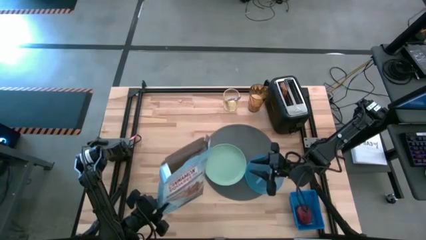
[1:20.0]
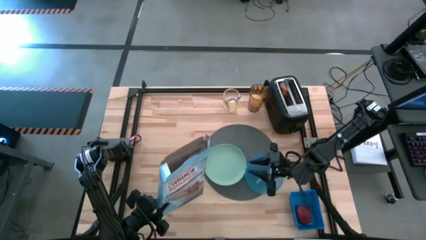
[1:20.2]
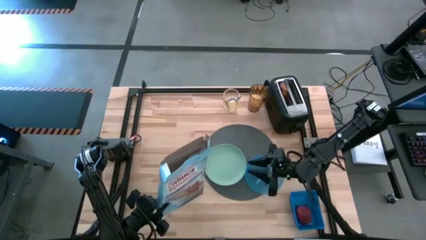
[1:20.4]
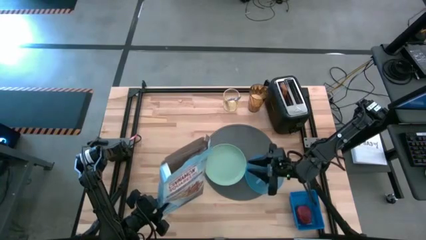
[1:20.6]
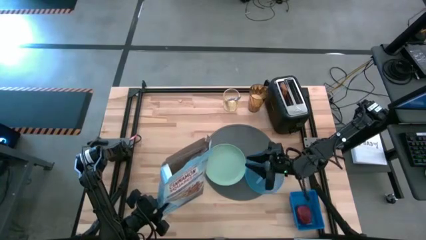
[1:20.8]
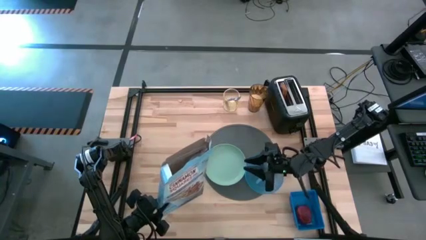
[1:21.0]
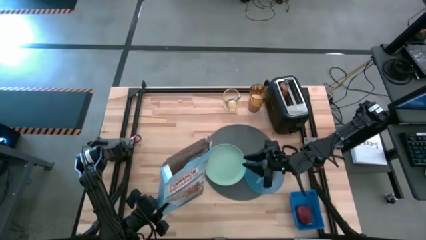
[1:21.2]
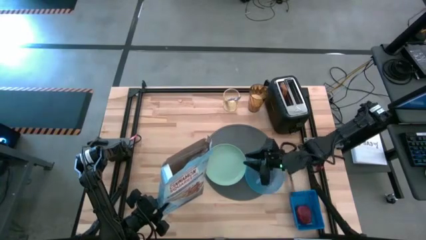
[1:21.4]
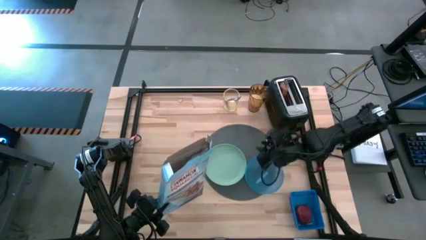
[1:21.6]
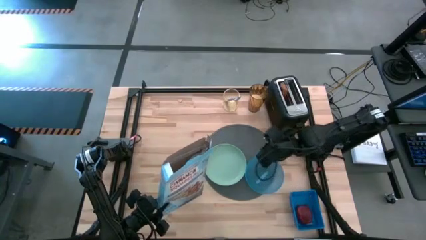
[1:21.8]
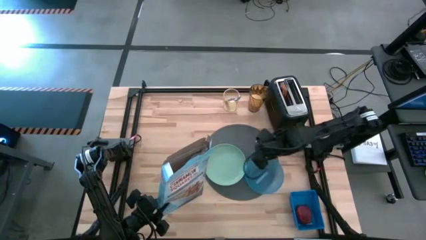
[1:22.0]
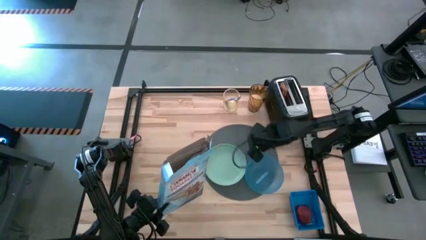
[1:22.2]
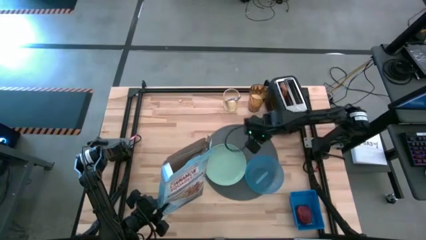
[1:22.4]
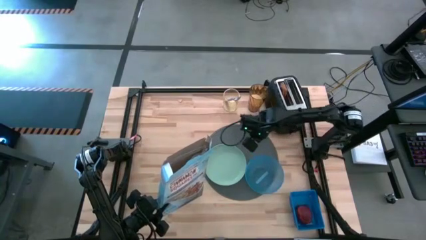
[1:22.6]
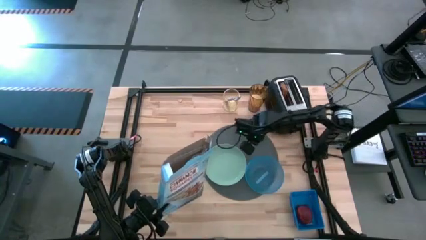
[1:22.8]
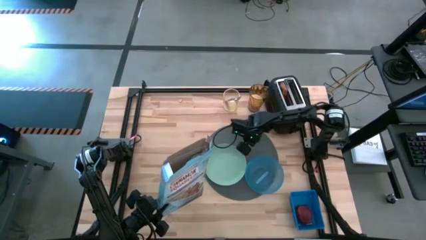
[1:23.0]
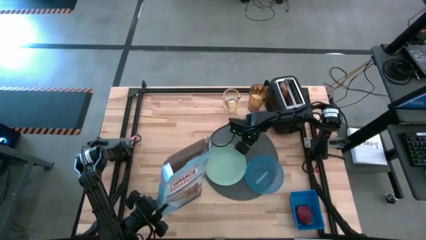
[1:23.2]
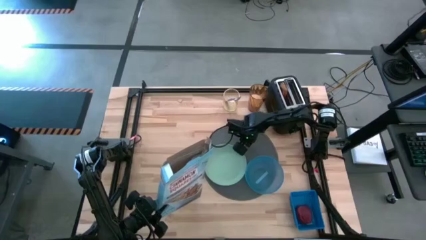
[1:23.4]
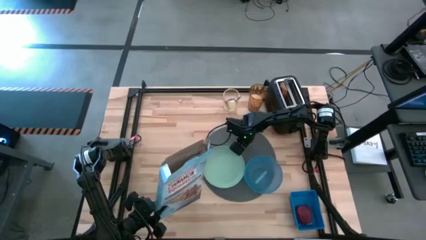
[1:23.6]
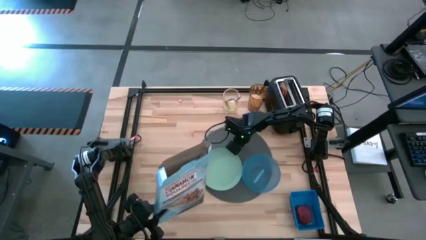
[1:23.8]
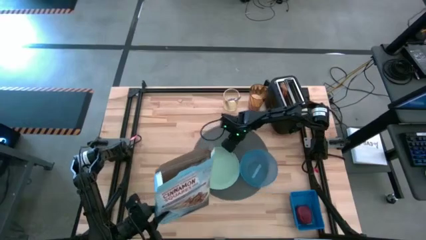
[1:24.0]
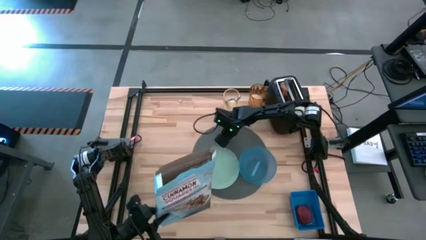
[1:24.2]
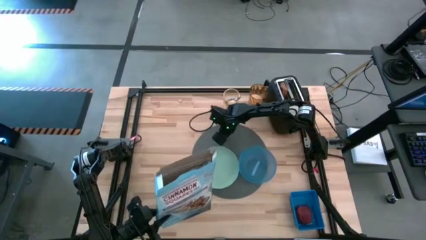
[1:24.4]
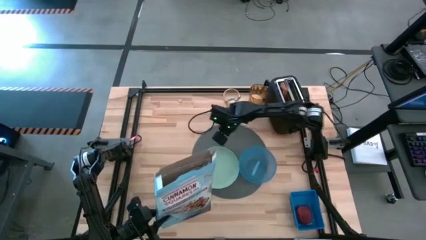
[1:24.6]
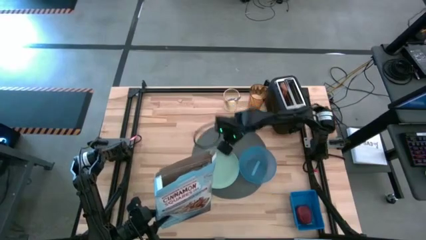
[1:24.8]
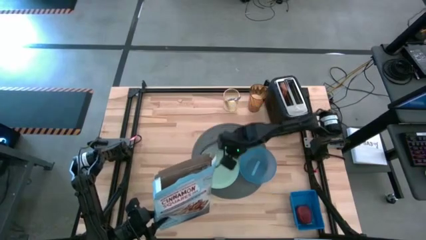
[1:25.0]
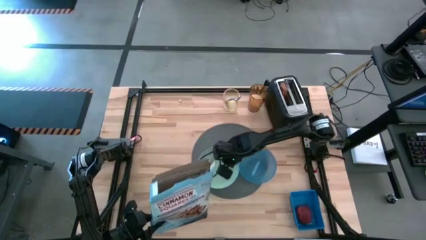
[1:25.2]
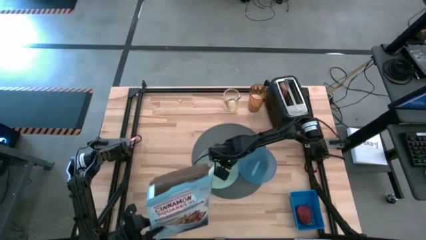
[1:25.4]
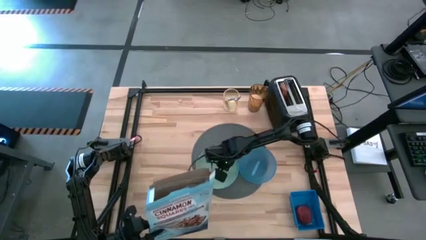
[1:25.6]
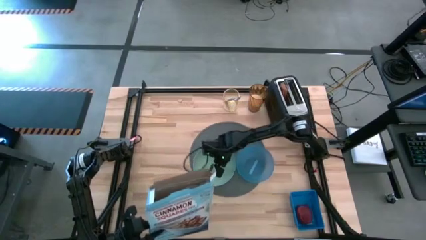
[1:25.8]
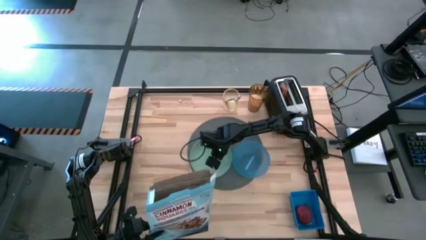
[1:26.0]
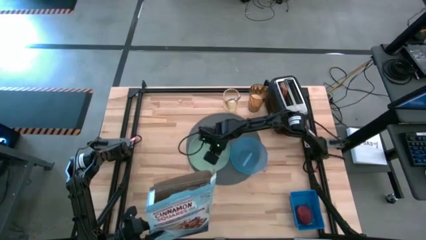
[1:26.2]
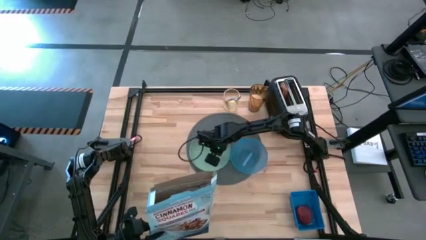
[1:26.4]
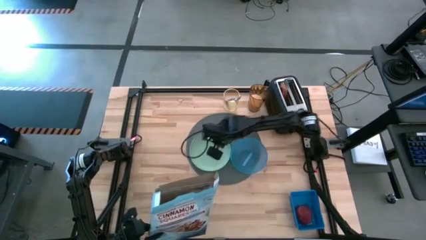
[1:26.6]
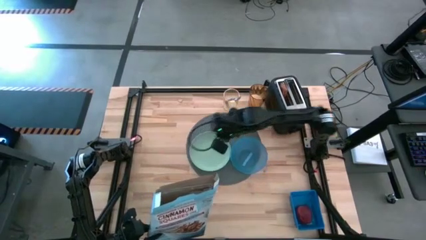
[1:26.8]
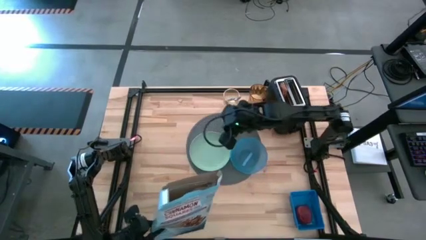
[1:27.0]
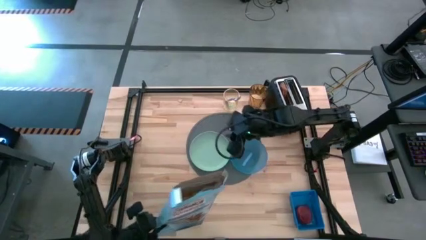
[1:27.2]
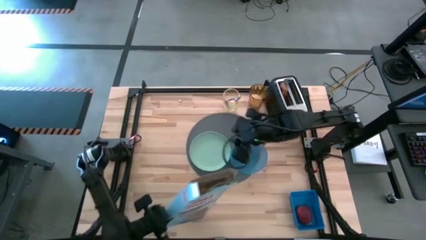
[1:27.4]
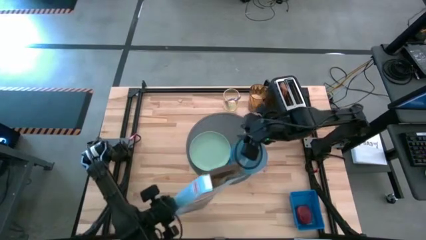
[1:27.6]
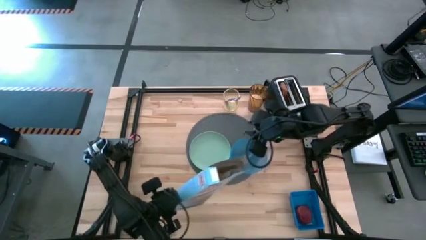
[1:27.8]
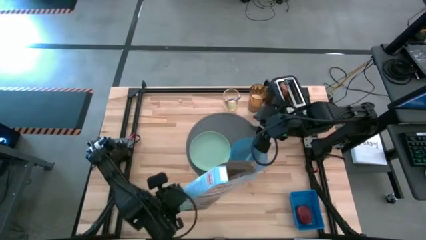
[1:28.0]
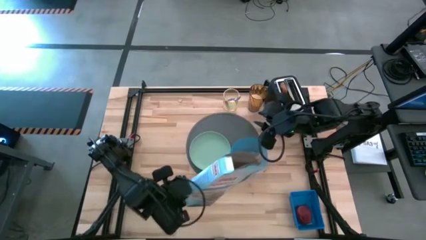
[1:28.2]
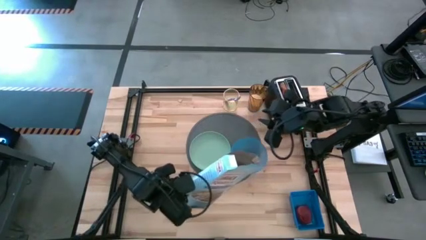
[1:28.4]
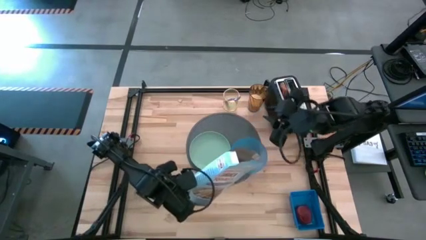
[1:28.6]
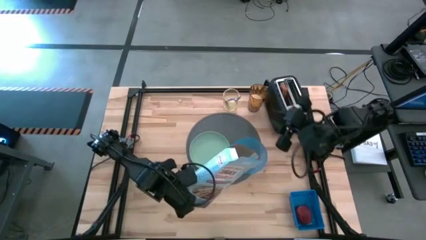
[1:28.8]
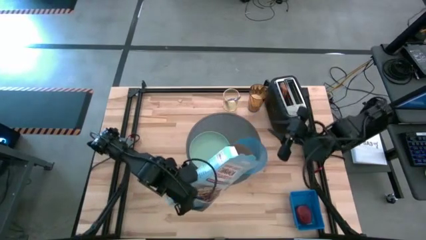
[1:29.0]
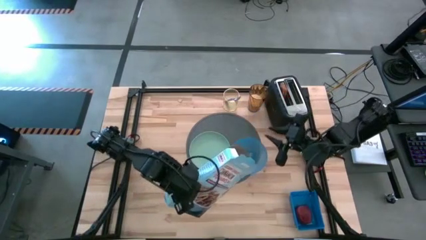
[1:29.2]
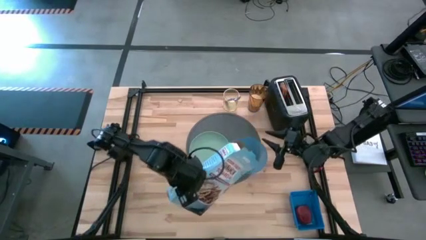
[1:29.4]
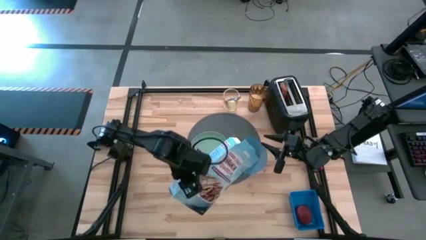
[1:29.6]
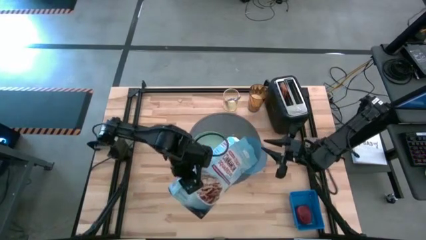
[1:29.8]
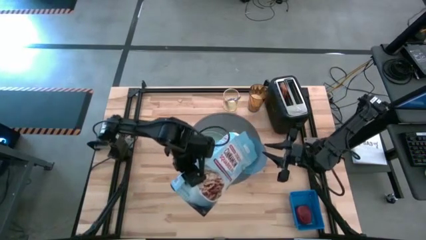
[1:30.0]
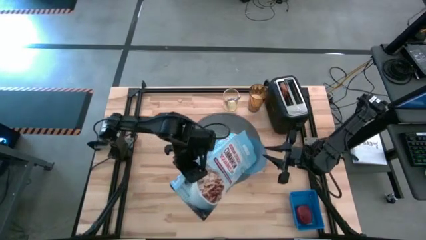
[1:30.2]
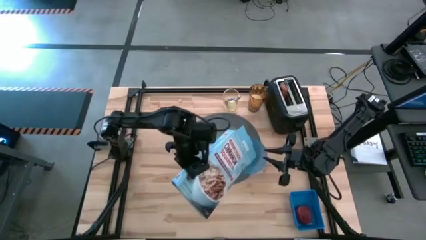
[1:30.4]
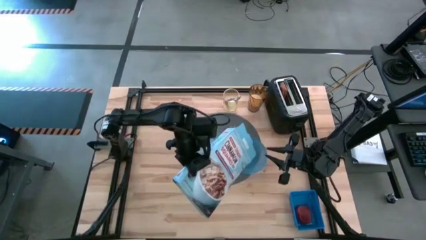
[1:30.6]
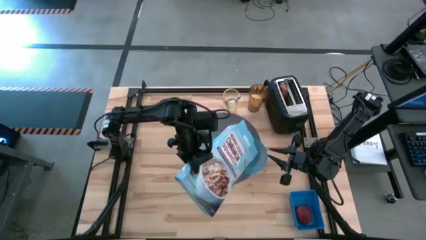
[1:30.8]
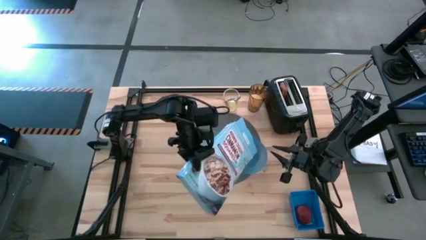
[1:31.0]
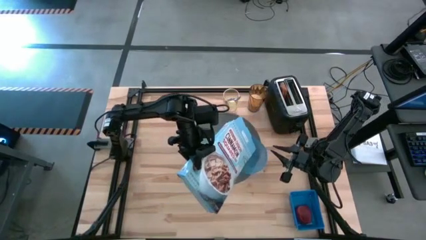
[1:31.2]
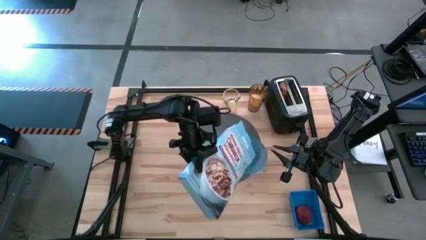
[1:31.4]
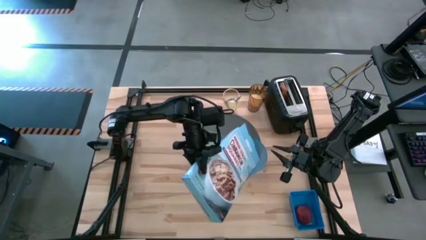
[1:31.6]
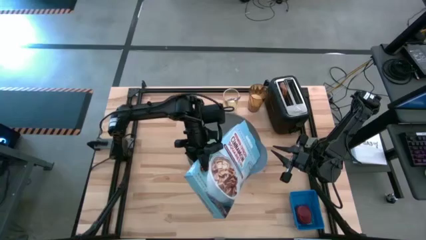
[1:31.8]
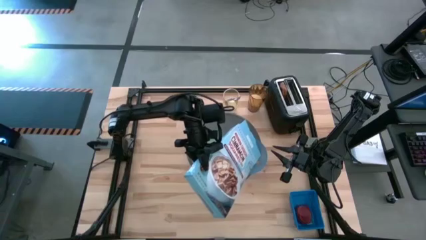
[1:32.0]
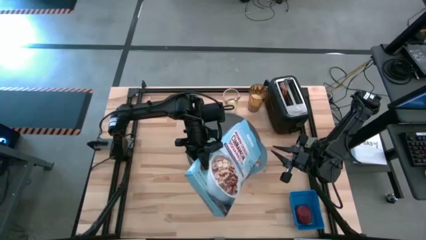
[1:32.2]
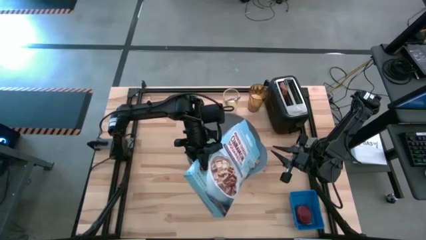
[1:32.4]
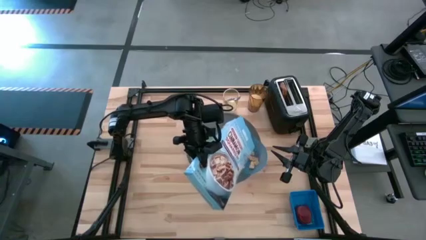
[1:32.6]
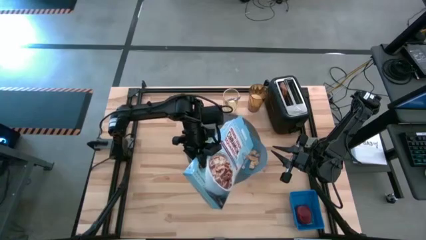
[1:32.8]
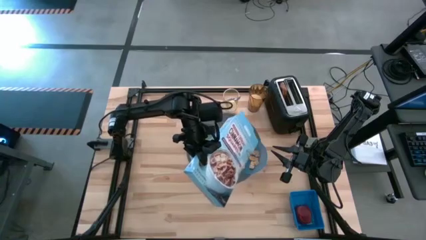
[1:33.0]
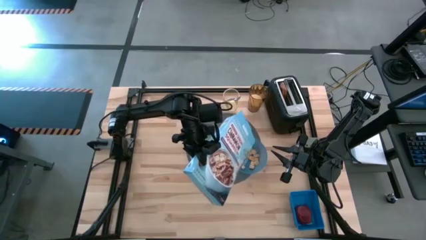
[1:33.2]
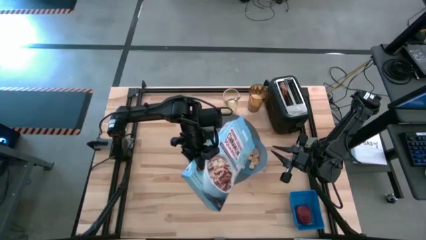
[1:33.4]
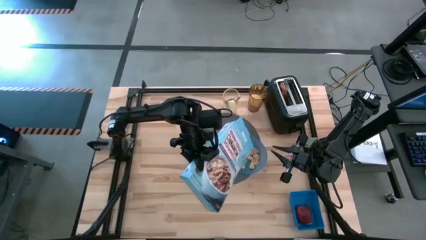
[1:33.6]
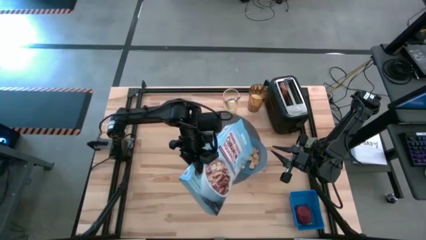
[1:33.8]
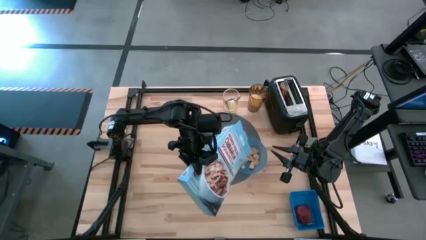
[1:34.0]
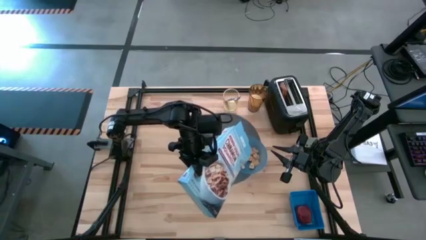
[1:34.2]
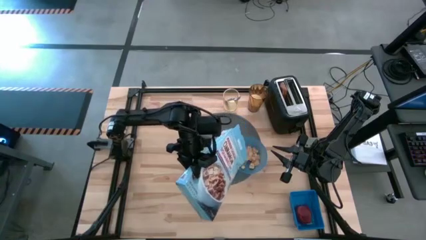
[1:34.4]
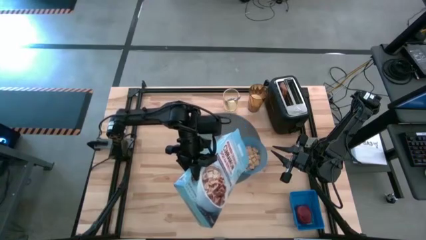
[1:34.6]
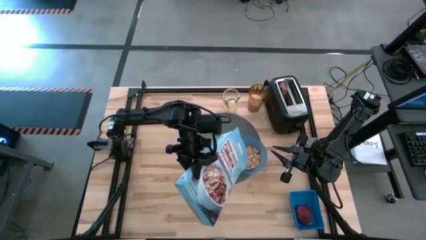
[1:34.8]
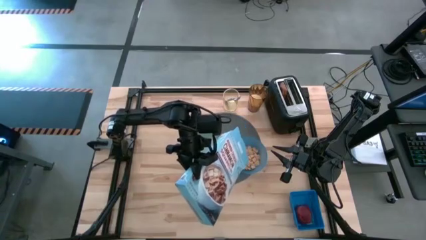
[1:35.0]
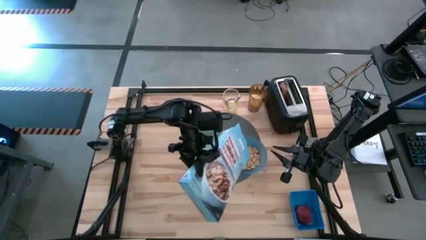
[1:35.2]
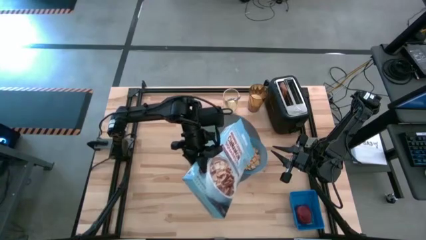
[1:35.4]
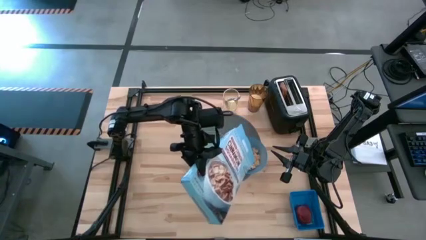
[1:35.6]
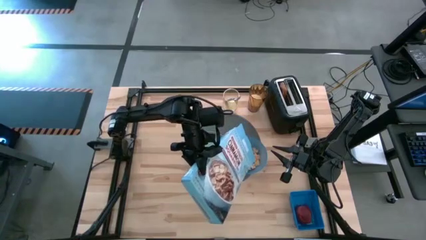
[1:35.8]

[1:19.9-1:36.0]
Task: Arrange a breakfast setting
Pour the cereal from the cereal box into the blue bowl
